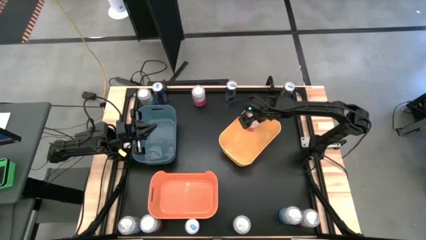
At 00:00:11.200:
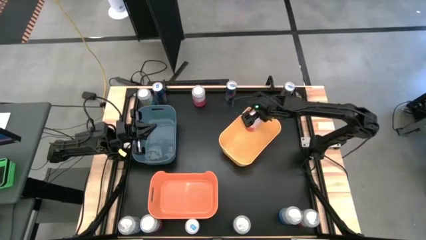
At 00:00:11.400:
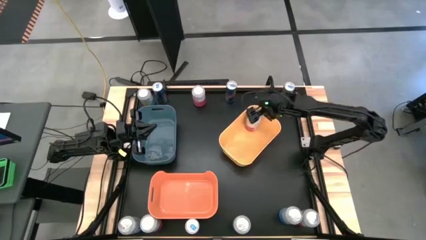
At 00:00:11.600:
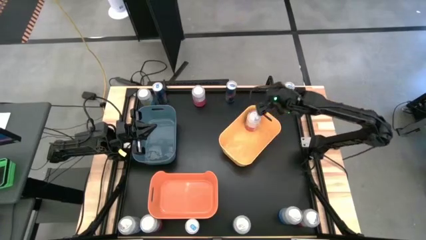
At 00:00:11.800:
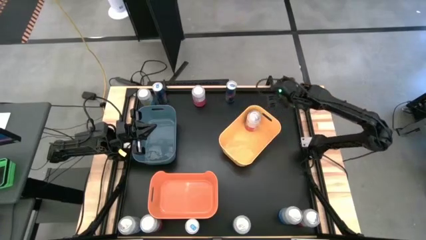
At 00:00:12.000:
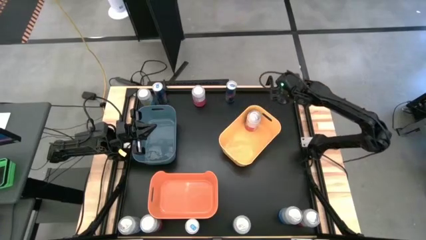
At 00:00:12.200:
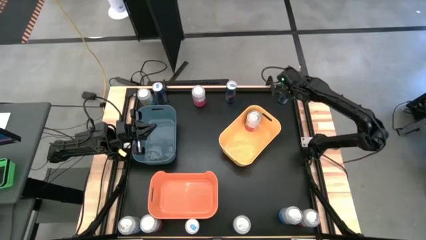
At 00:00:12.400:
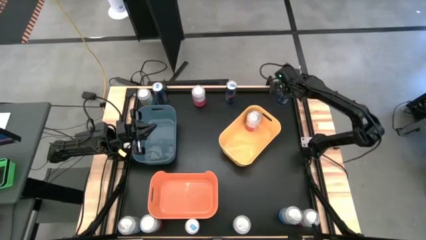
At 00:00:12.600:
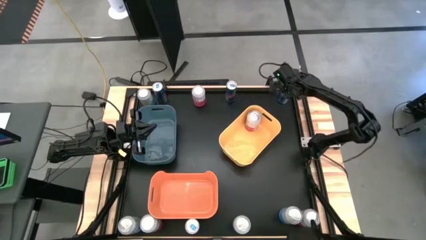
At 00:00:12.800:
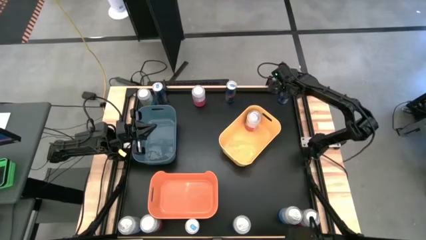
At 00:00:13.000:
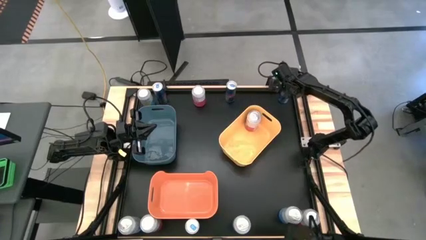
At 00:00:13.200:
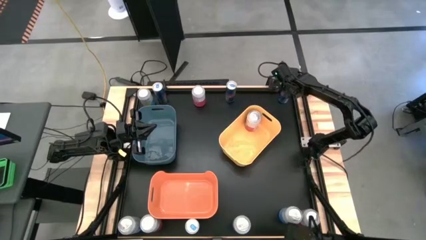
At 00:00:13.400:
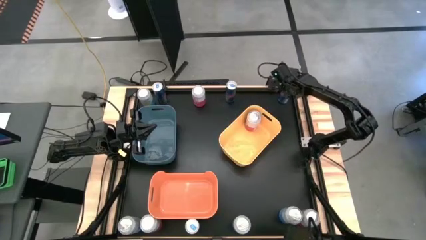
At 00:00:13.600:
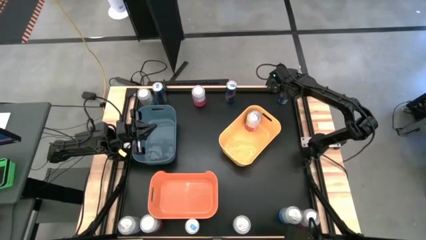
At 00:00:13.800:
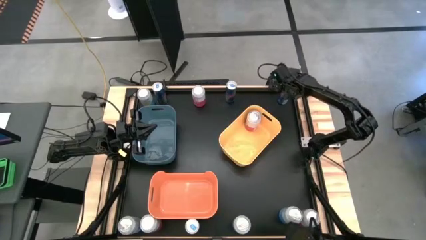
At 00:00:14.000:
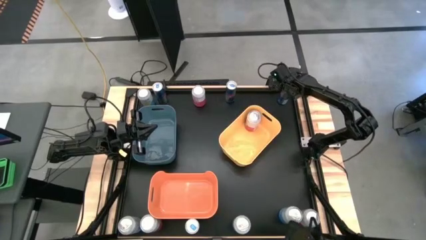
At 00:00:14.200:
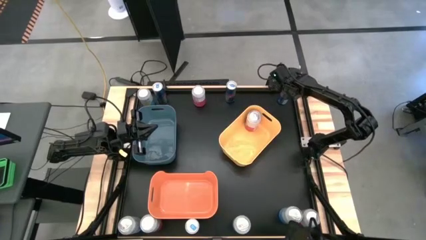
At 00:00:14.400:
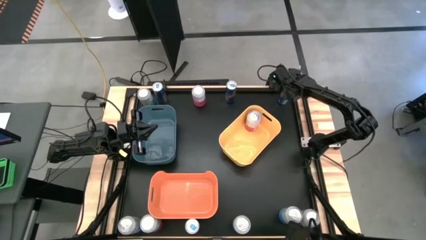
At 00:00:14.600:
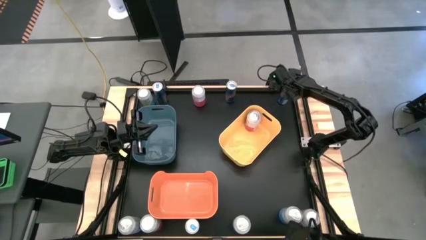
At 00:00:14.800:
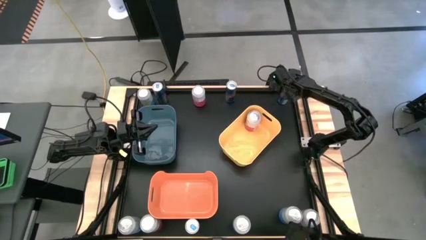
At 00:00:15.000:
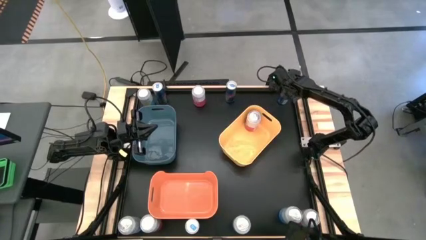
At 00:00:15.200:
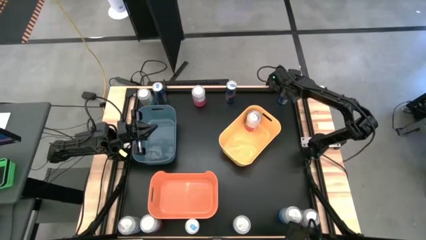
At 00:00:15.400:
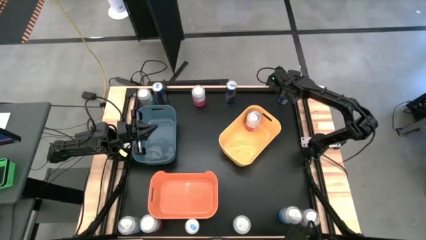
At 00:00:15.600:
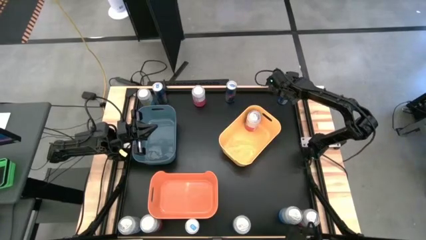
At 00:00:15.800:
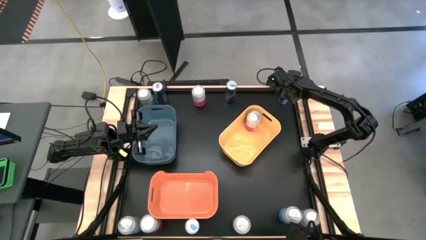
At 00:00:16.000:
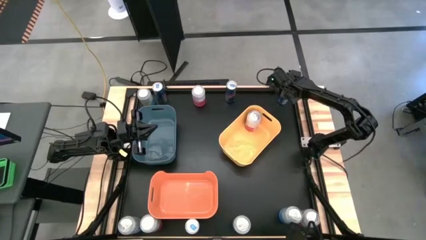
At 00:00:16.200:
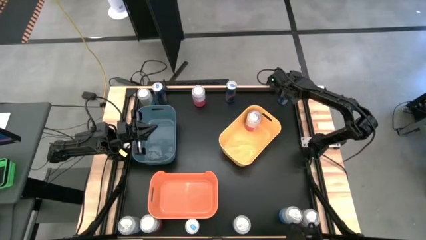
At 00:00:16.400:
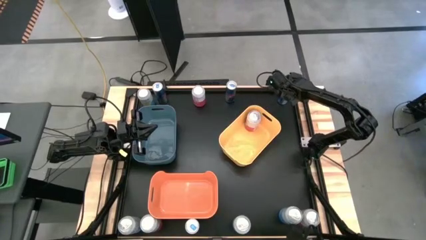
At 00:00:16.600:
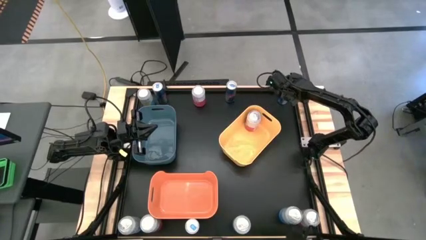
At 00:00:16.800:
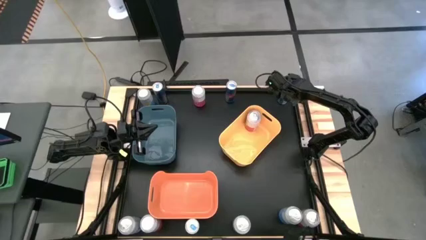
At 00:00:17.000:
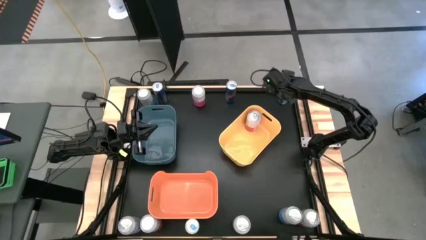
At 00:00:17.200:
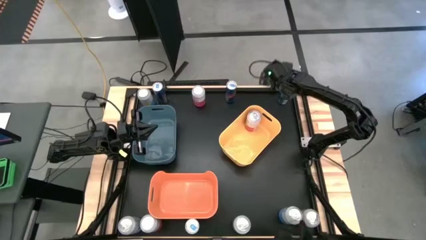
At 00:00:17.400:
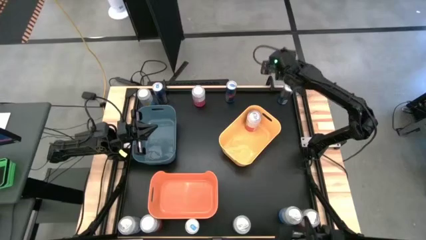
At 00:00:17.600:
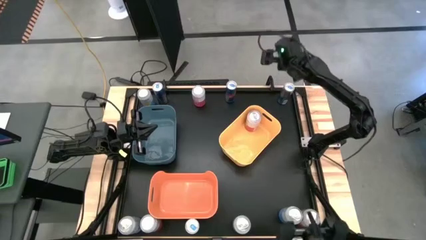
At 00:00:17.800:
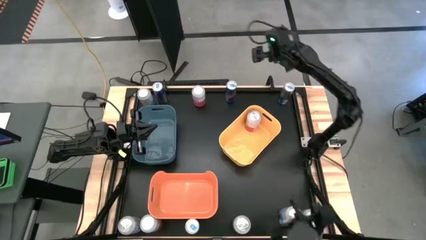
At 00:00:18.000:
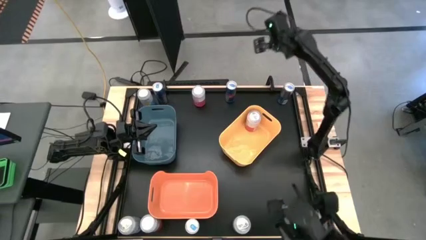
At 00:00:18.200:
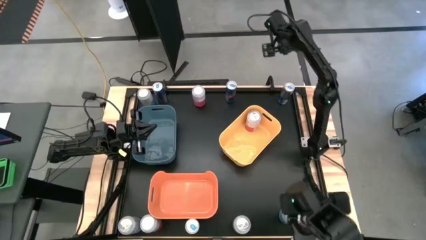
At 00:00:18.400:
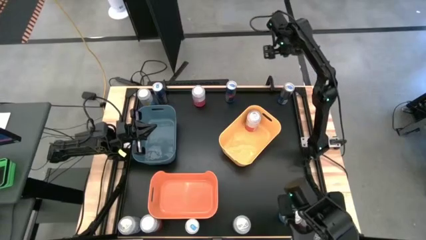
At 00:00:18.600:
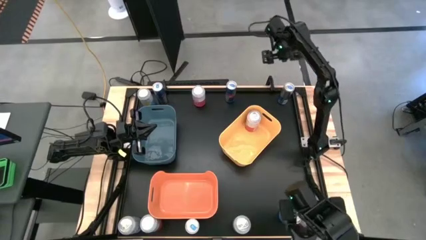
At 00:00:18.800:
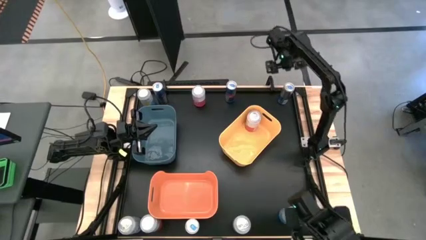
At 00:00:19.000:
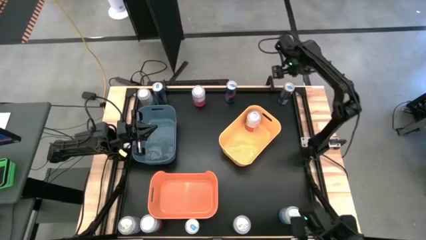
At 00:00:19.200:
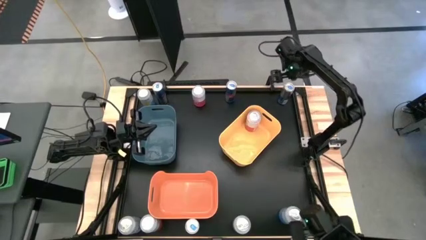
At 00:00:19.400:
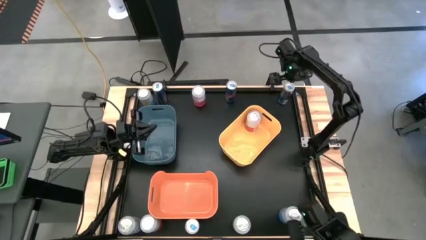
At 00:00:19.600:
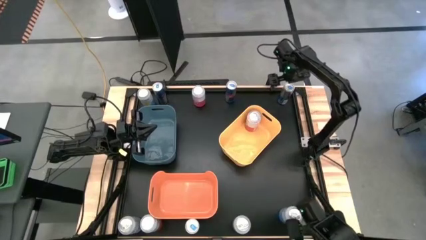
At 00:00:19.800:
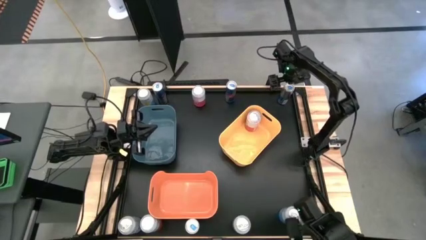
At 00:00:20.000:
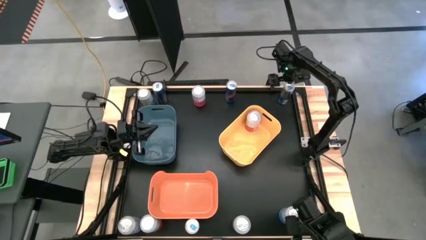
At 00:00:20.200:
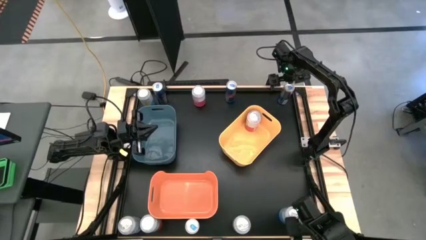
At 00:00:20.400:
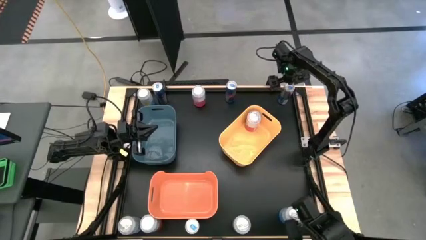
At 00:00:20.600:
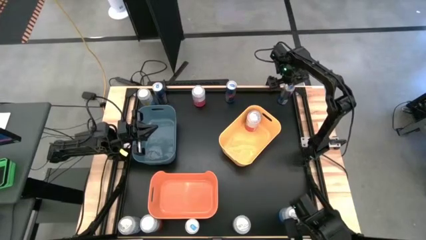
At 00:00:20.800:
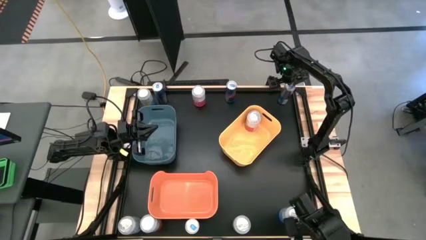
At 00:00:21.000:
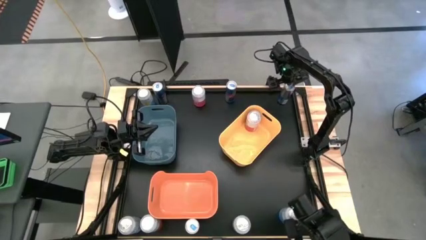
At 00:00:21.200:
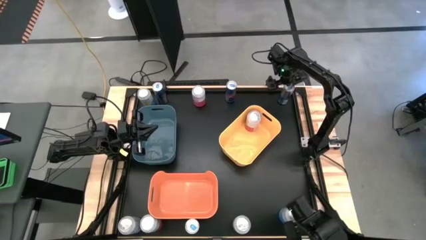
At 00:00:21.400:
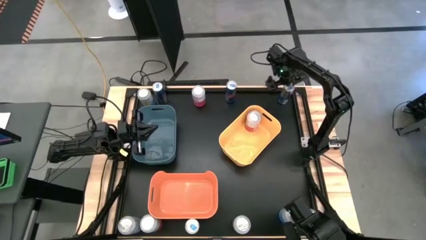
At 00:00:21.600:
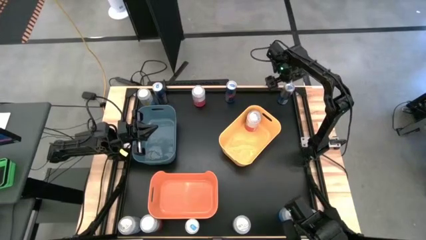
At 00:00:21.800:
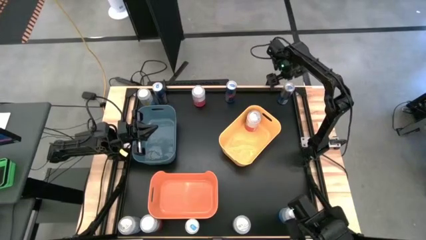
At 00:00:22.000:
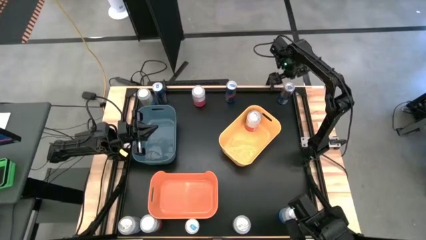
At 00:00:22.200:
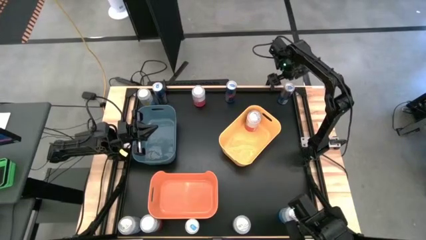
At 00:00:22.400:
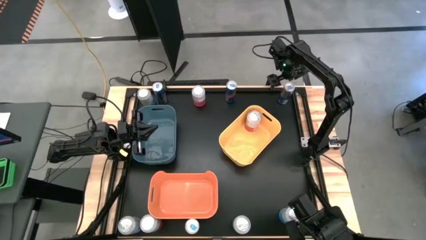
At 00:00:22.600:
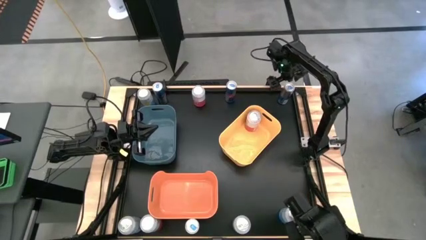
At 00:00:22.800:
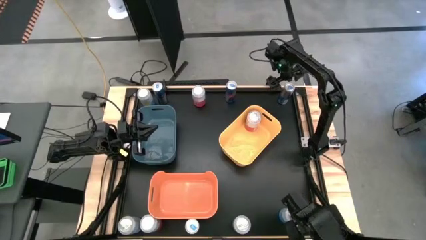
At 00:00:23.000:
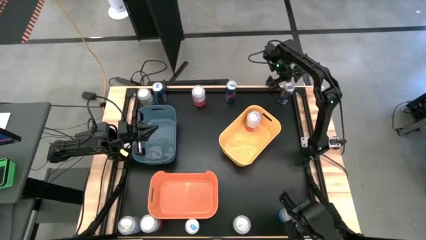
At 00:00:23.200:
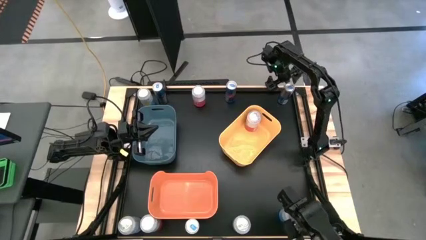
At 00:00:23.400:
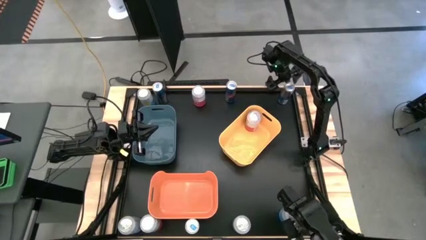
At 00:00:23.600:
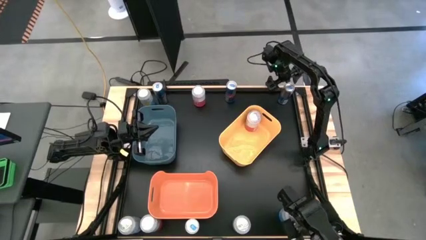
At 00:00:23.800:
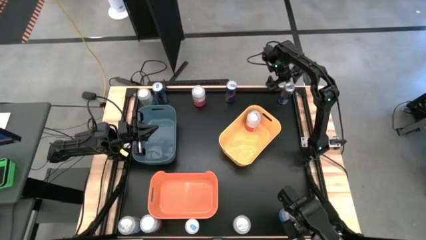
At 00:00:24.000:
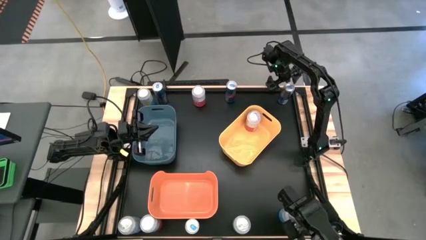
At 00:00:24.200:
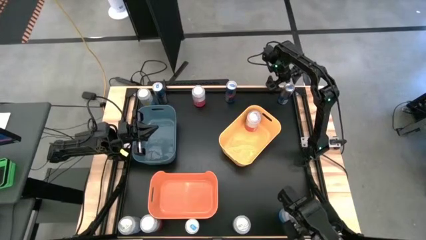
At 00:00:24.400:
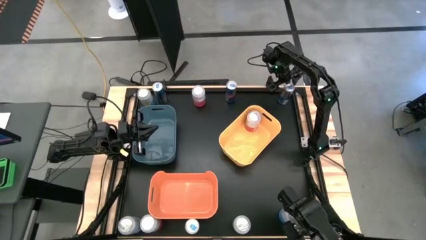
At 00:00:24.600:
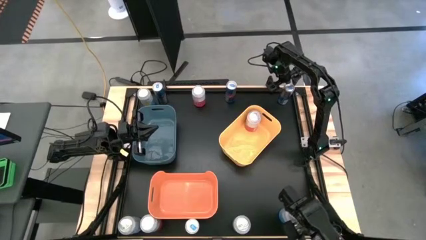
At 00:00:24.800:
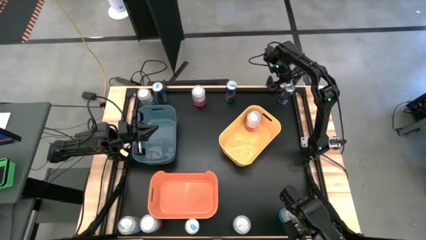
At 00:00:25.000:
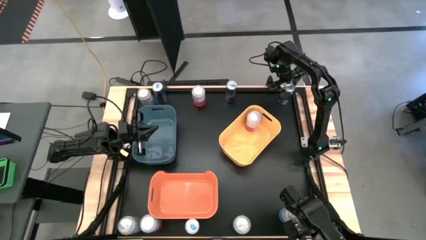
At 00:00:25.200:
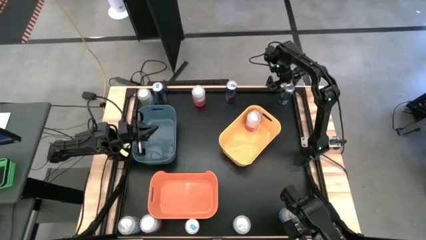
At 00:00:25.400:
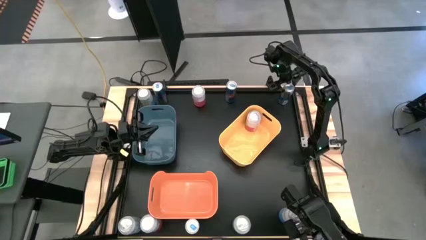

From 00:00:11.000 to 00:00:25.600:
Task: Sort soda cans
Put the blue soda can into the orange bin
